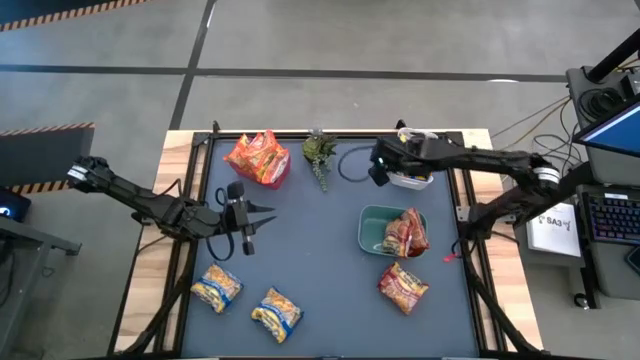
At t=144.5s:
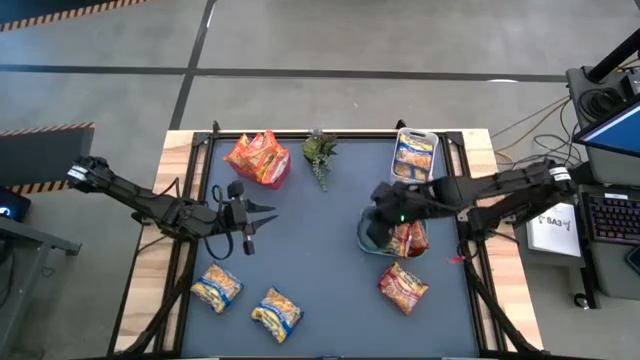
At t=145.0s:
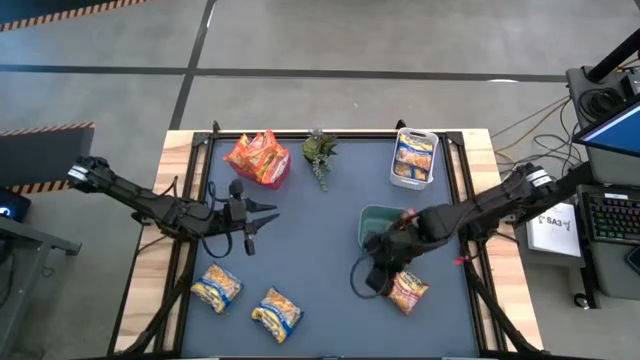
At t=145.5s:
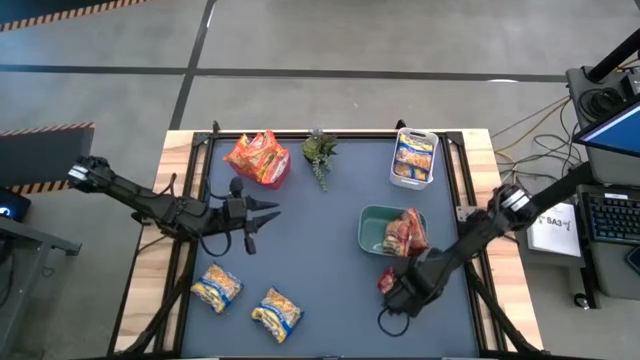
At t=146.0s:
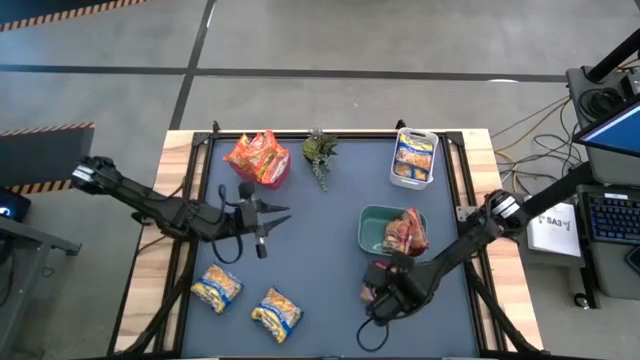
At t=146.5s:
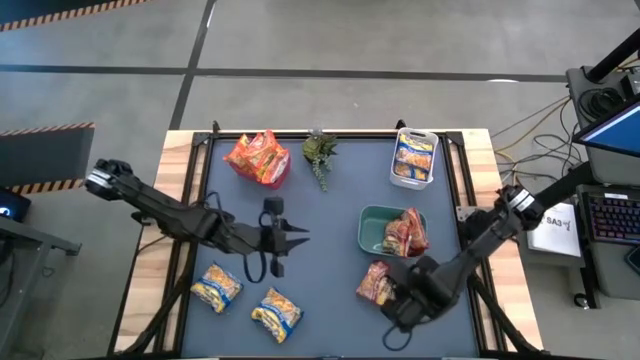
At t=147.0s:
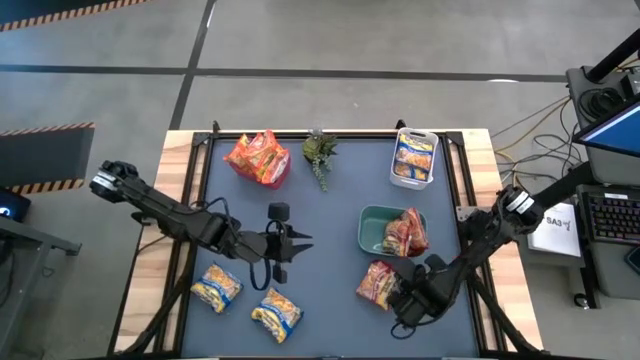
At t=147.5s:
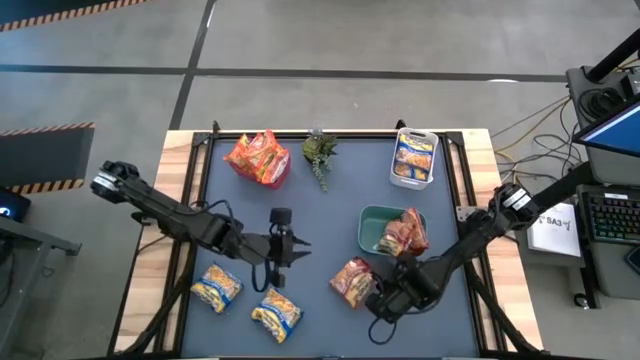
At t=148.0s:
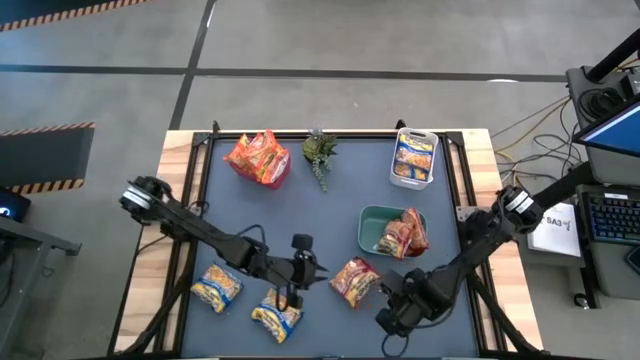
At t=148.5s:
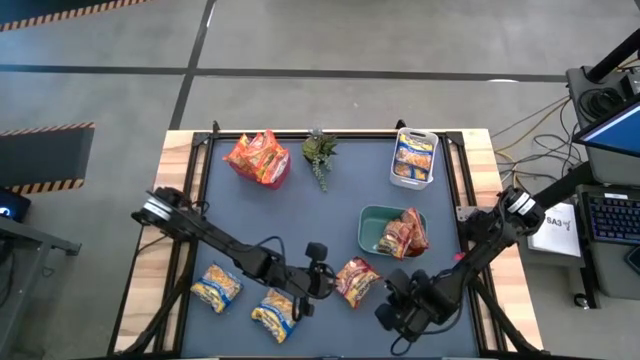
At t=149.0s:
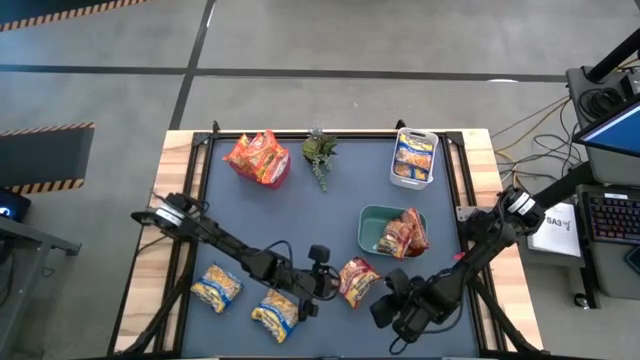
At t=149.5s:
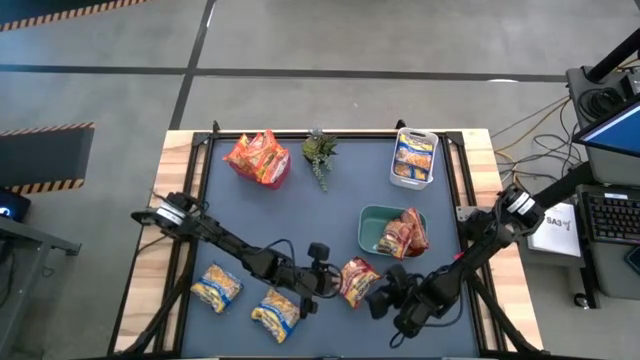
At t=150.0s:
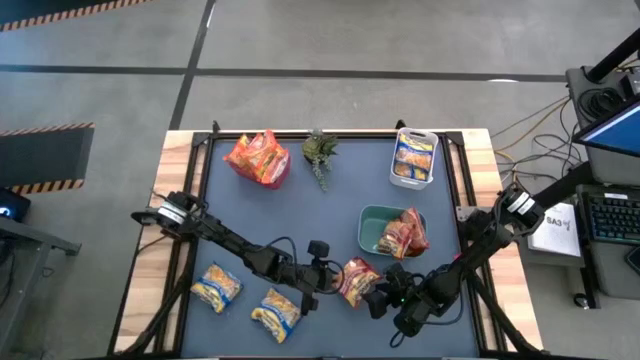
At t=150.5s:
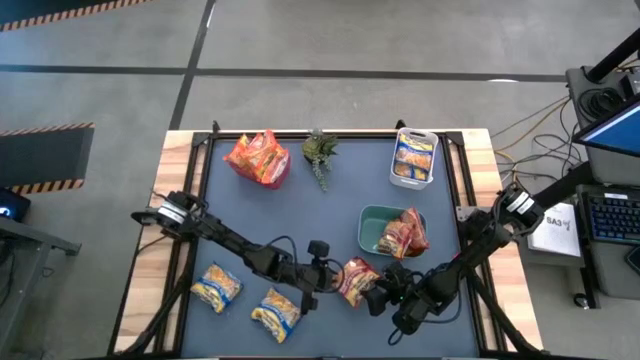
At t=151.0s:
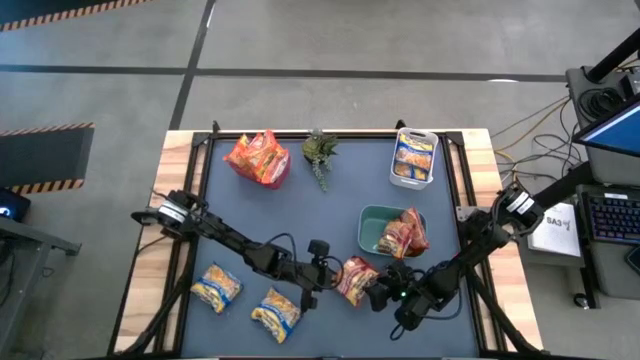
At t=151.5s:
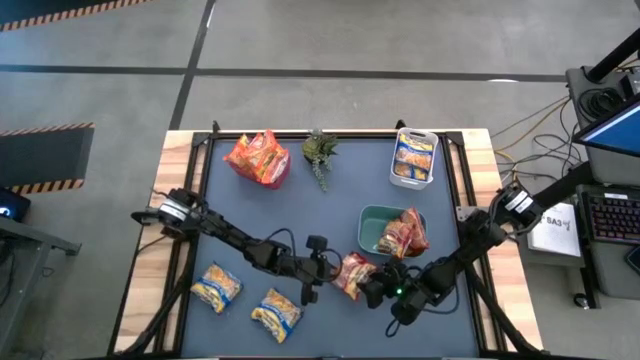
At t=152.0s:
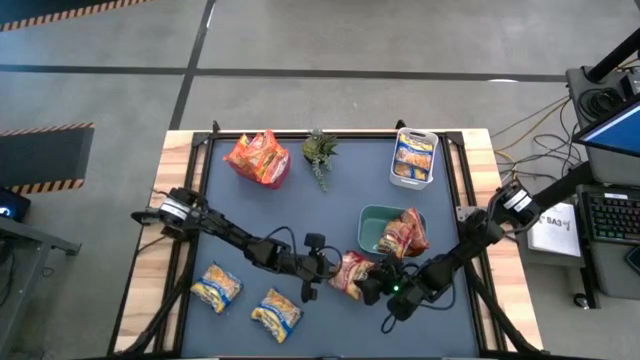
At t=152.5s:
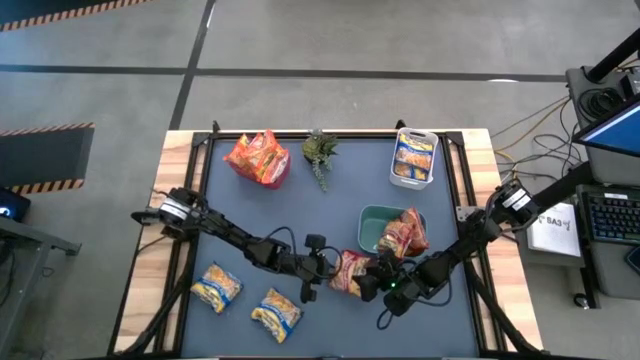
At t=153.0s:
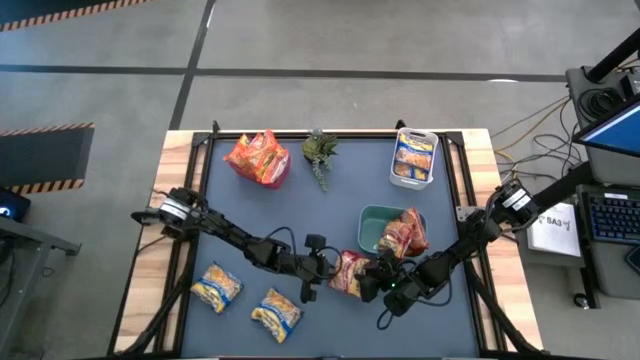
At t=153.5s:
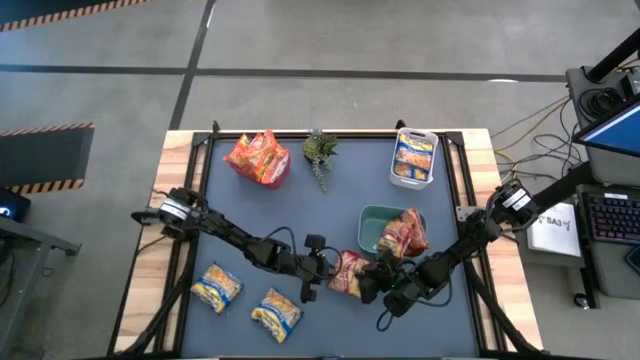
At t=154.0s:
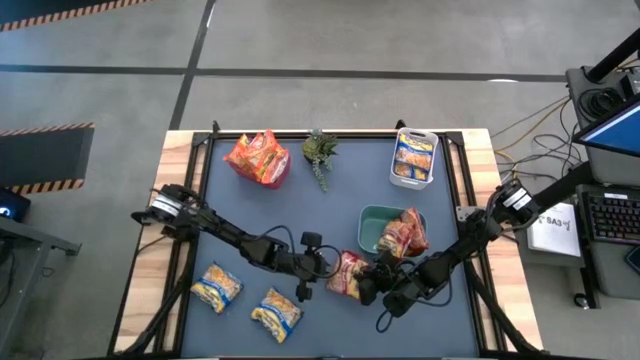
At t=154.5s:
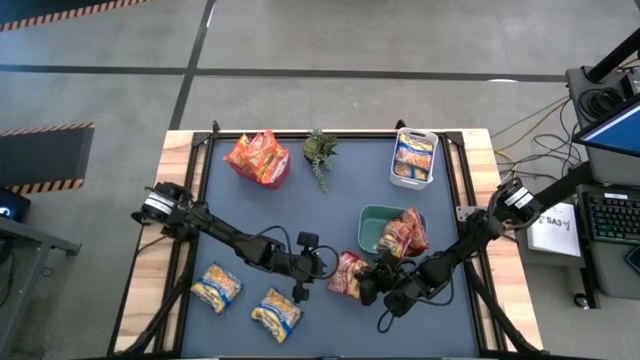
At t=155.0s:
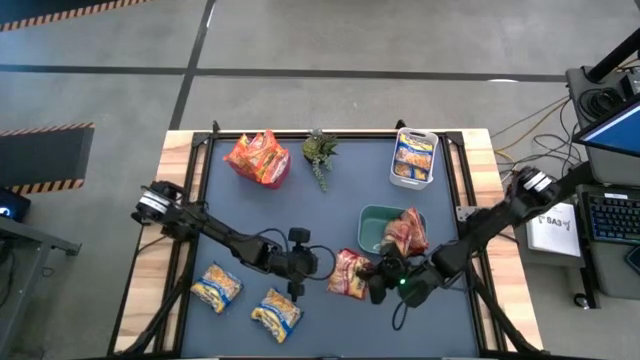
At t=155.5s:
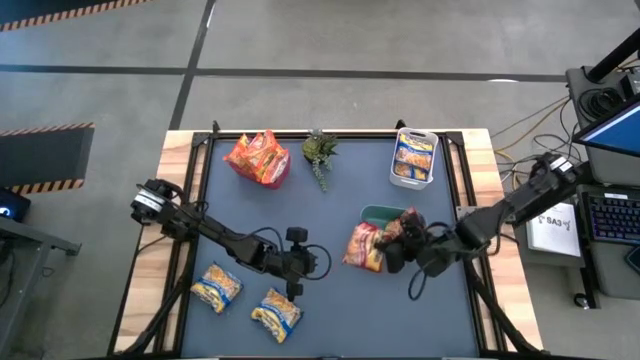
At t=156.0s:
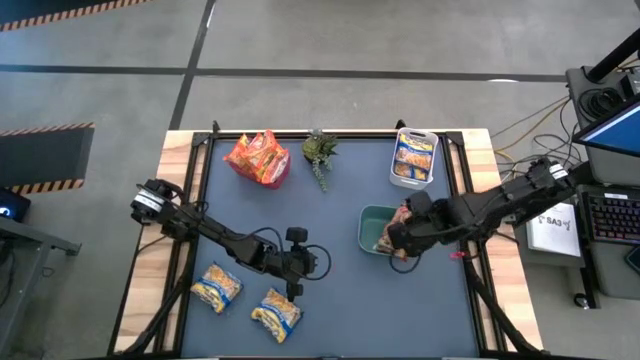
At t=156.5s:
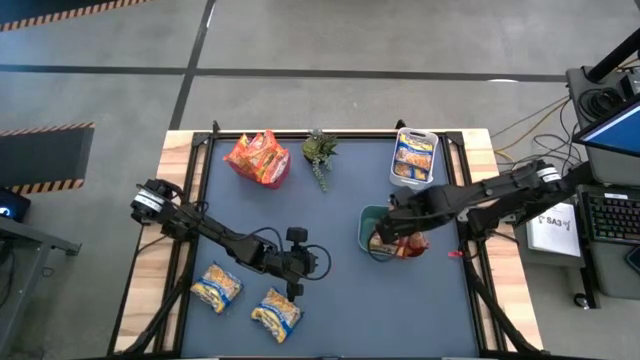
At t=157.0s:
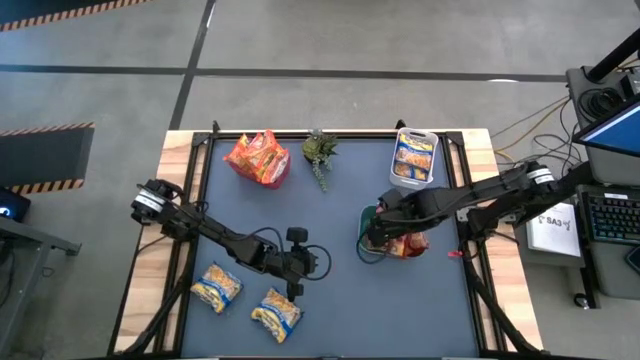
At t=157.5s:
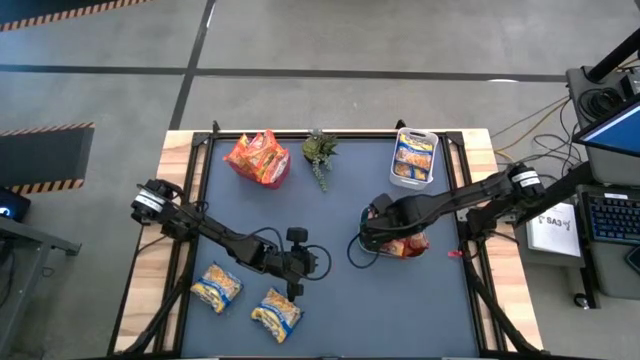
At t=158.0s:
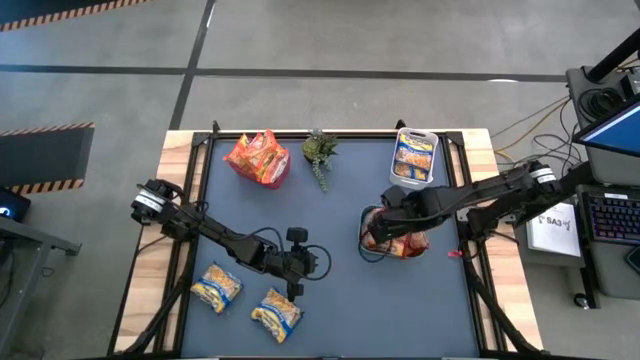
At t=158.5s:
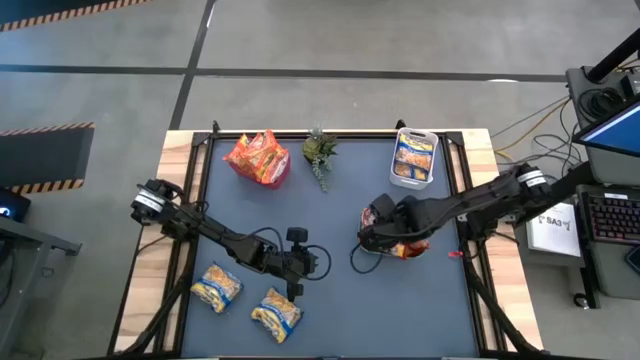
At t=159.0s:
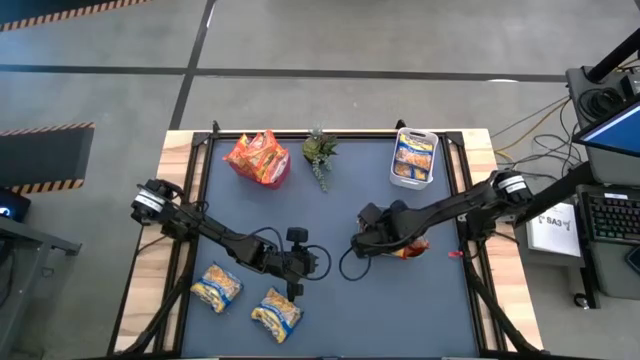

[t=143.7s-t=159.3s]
Task: Sort Maruchan noodles
Put the red noodle pack into the green bin

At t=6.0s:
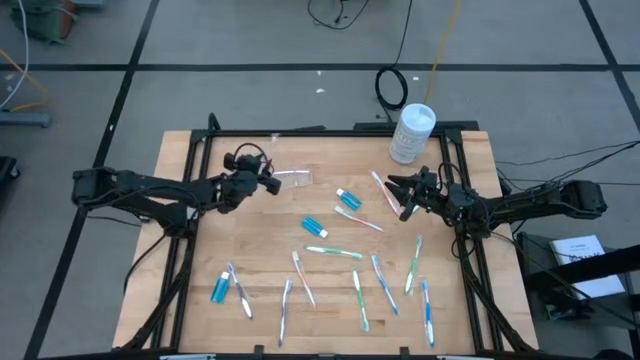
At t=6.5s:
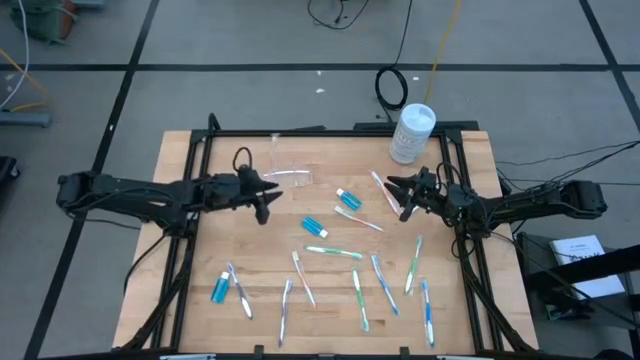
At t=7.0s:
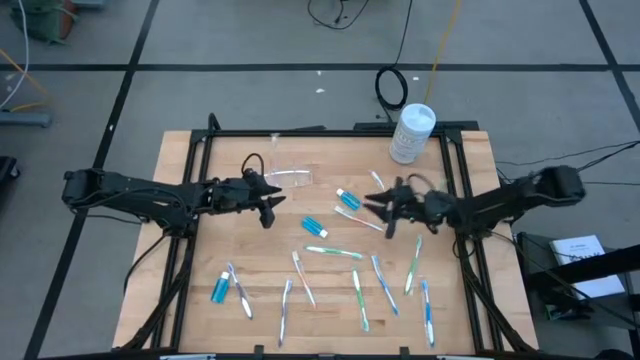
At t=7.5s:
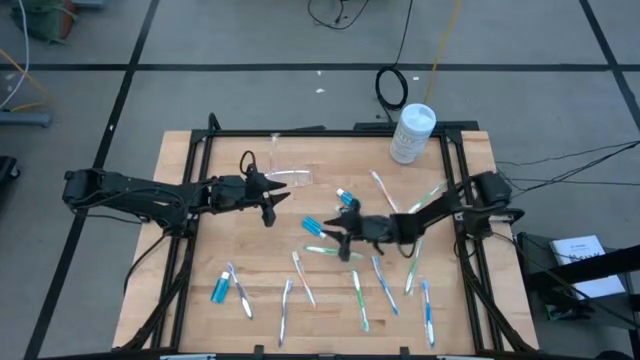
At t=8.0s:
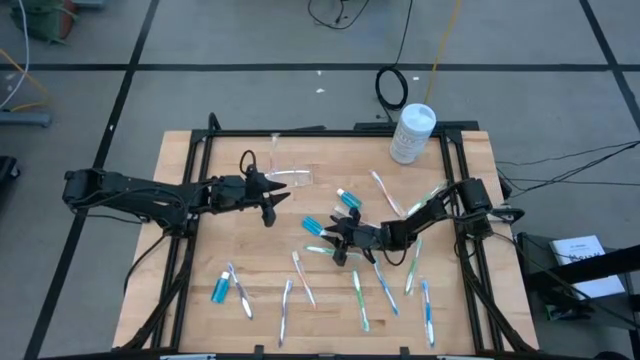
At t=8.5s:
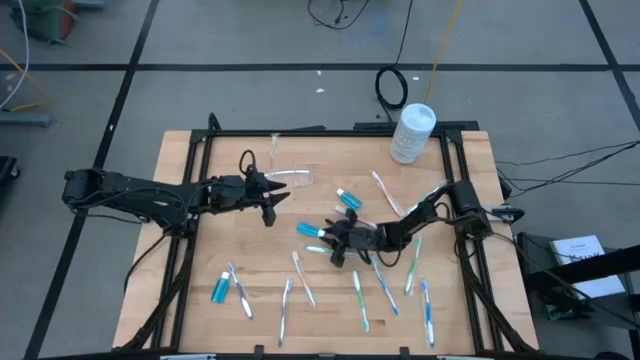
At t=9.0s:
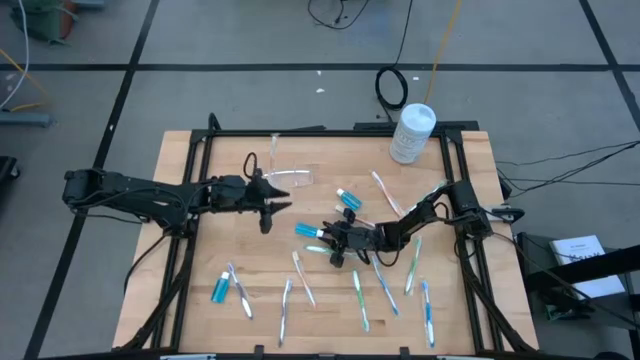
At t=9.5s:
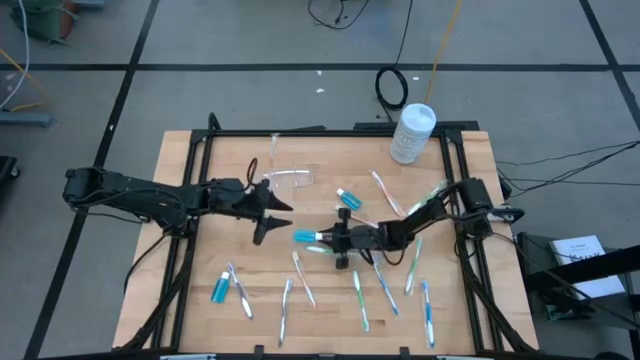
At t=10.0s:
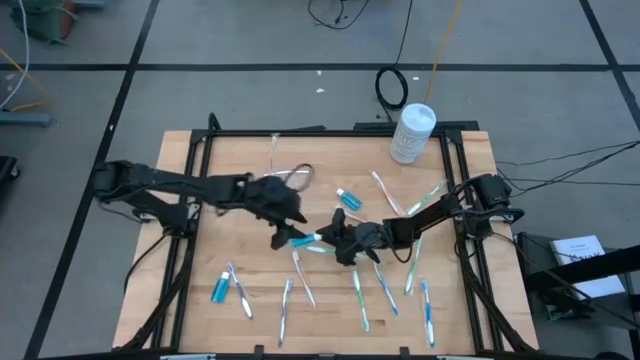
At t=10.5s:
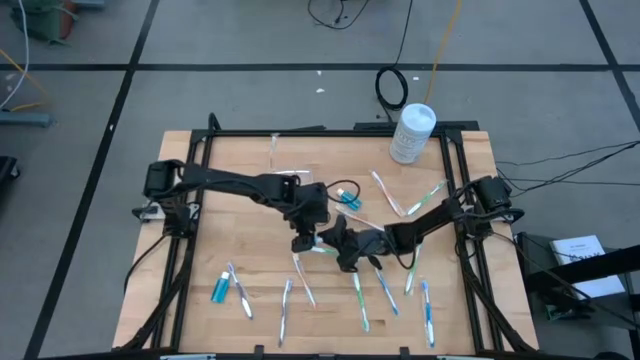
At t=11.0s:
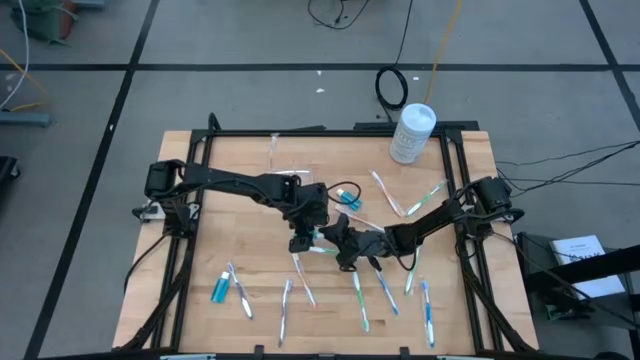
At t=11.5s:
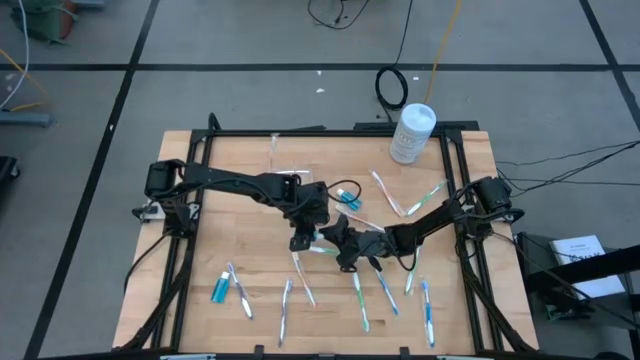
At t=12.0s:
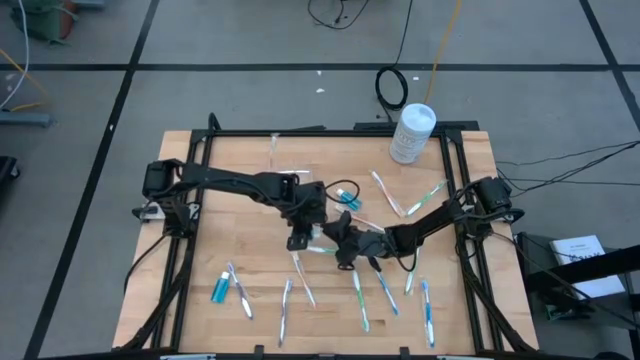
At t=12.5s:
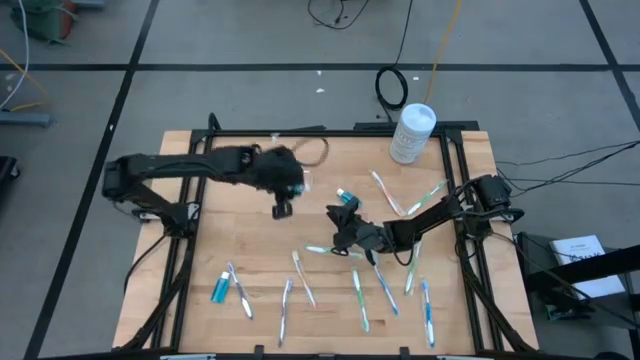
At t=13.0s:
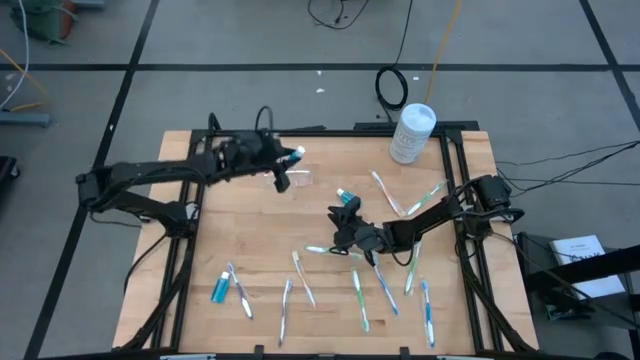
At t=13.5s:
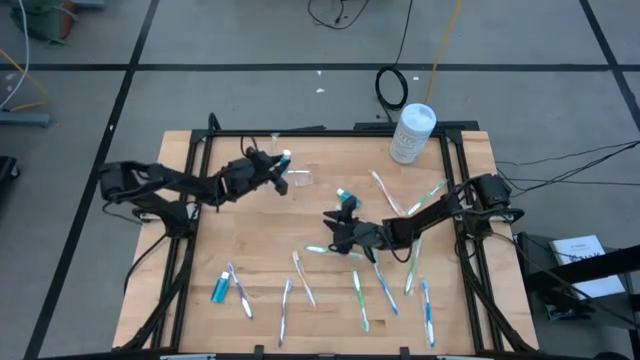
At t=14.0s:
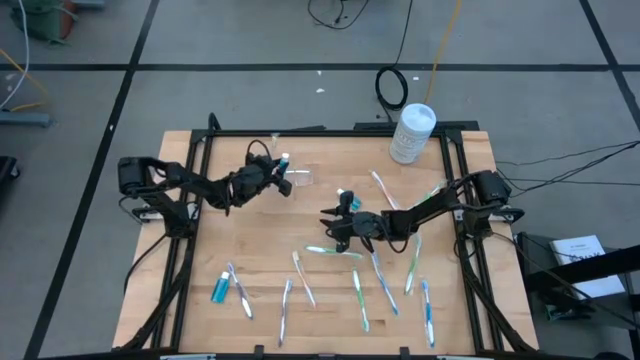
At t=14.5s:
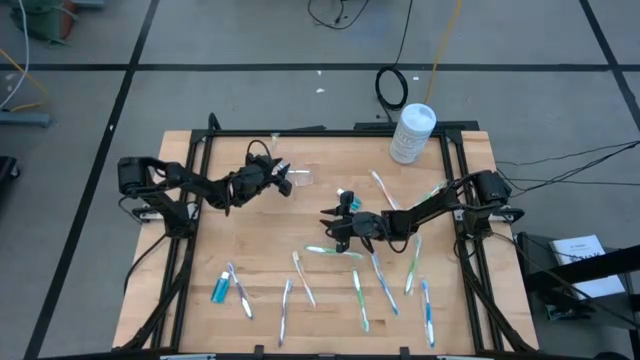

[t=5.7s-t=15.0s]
Task: Pick & Place toothbrushing station
Put the blue mouthwash into the transparent organizer
